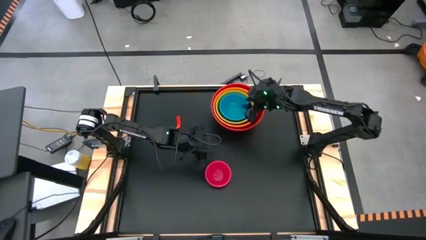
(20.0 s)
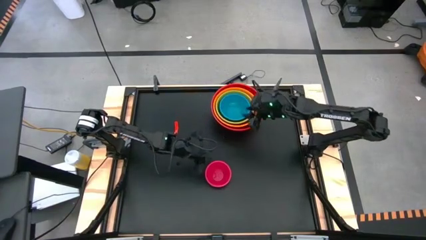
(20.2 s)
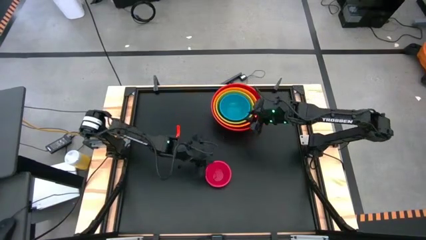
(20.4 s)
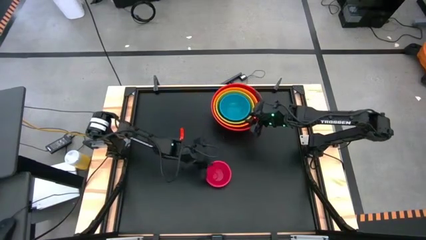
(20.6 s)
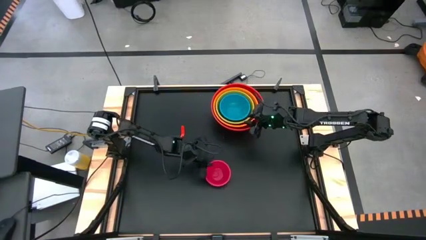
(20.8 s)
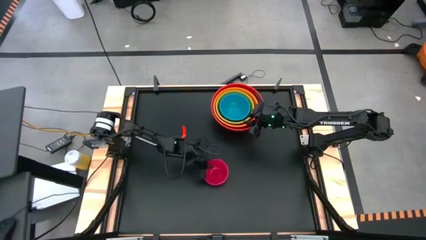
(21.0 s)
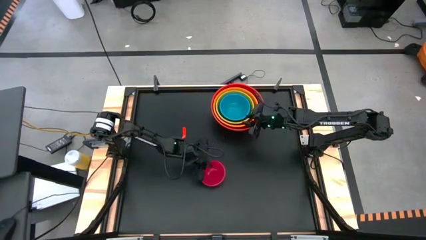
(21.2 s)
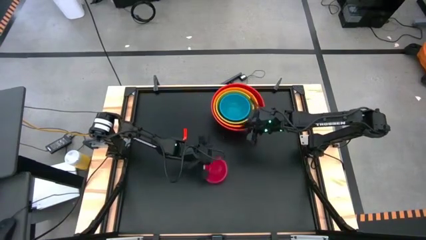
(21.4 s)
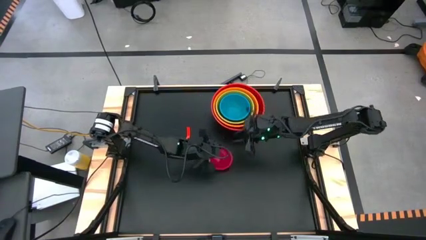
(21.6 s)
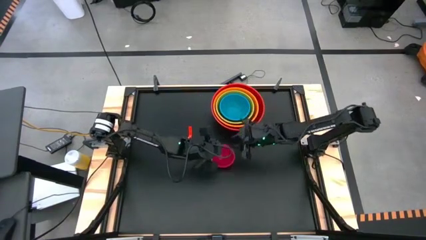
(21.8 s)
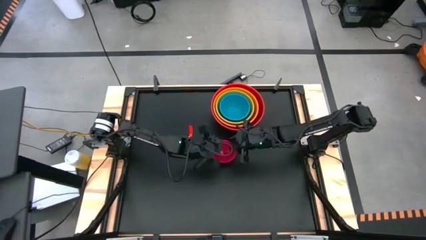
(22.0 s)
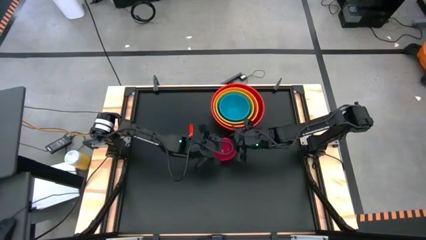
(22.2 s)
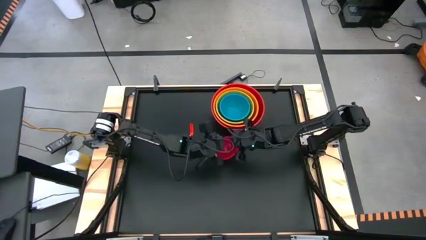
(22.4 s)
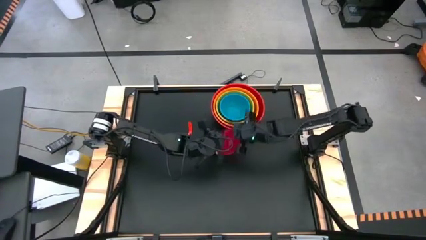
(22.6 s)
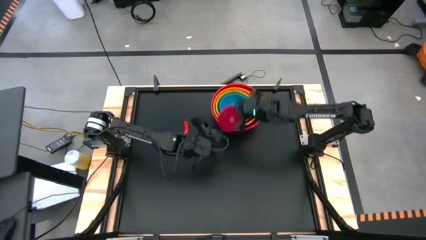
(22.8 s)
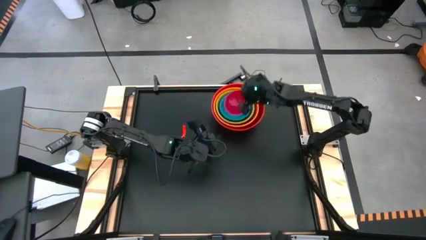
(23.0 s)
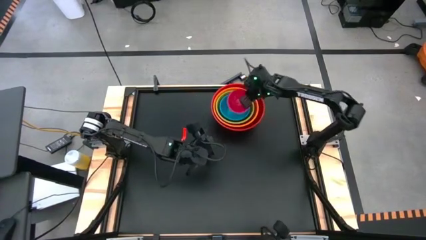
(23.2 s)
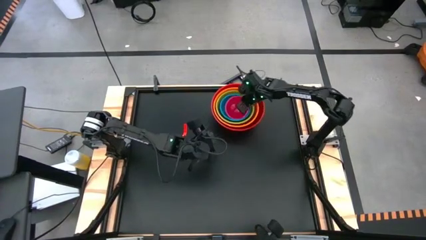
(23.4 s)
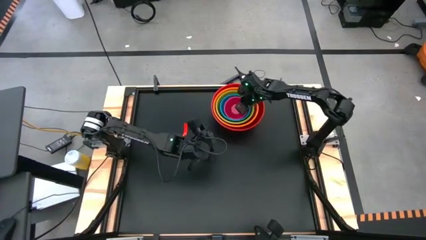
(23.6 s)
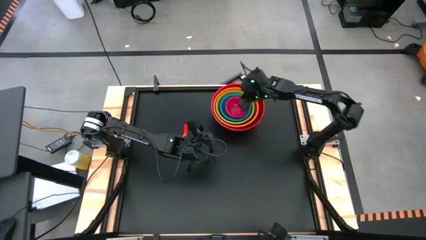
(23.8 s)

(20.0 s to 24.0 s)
Stack the pink bowl on the blue bowl

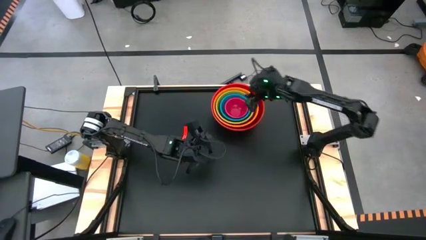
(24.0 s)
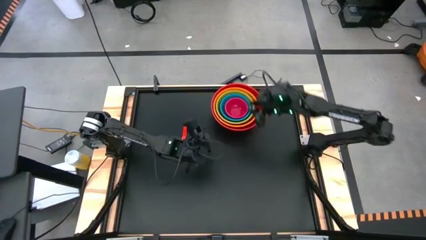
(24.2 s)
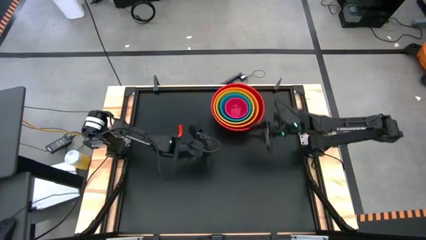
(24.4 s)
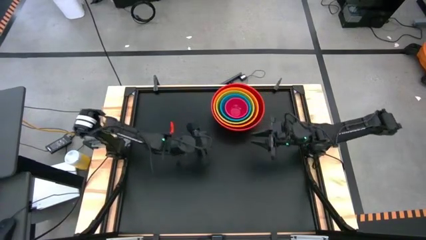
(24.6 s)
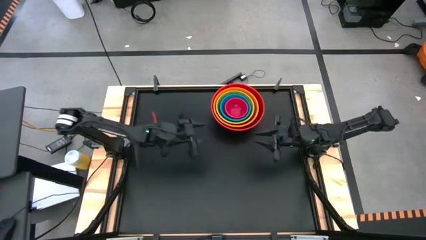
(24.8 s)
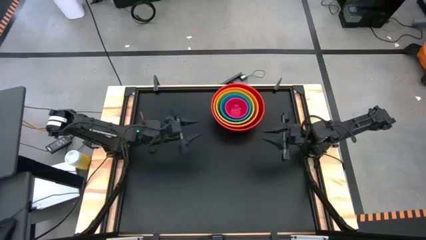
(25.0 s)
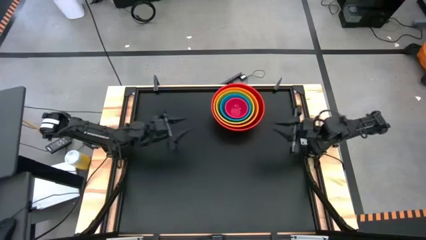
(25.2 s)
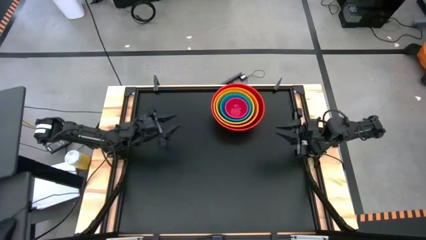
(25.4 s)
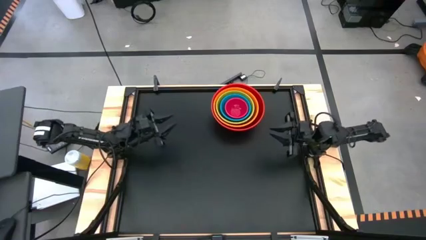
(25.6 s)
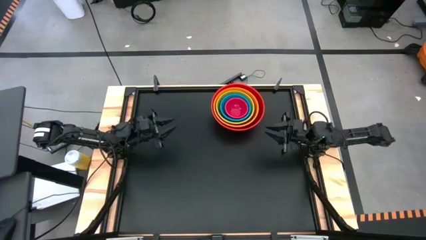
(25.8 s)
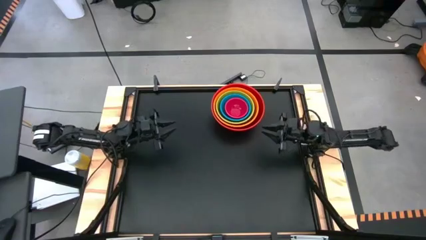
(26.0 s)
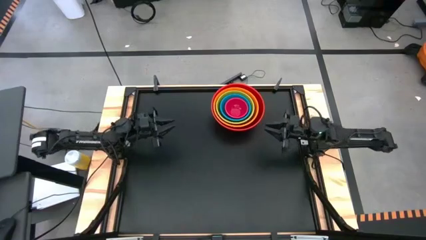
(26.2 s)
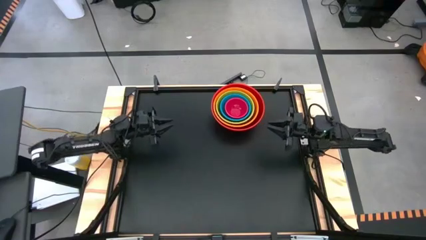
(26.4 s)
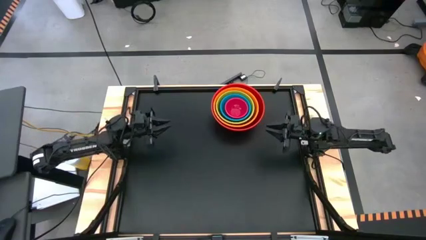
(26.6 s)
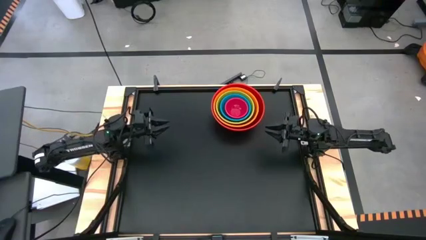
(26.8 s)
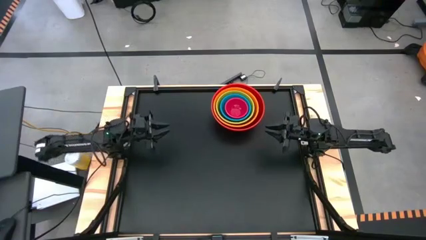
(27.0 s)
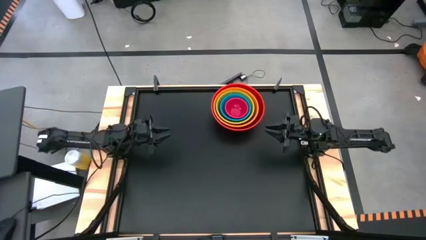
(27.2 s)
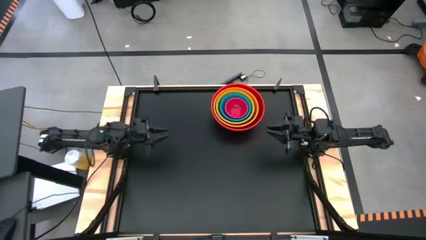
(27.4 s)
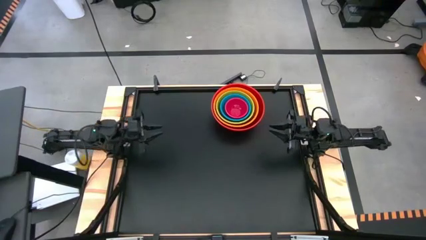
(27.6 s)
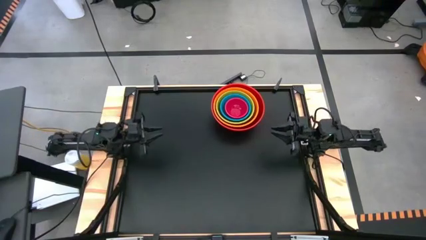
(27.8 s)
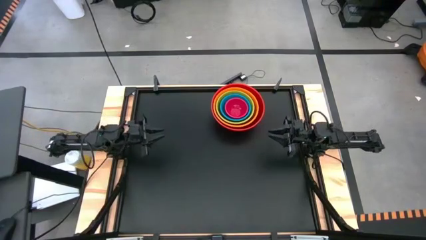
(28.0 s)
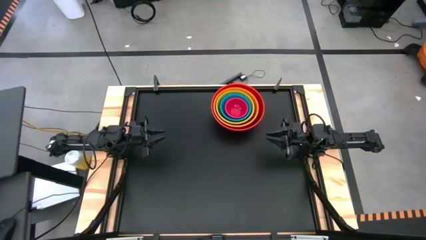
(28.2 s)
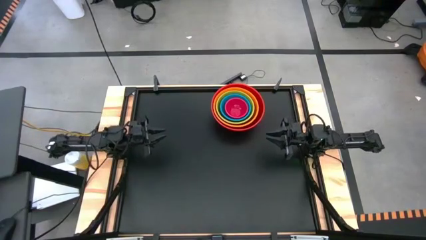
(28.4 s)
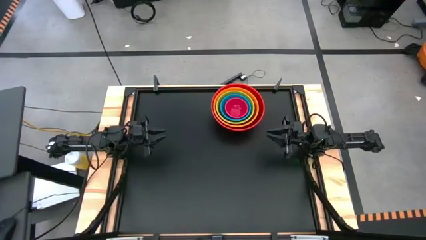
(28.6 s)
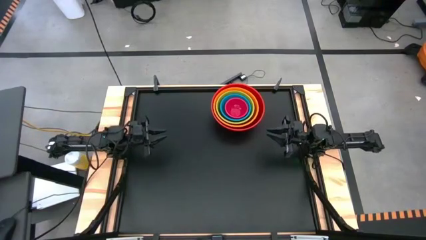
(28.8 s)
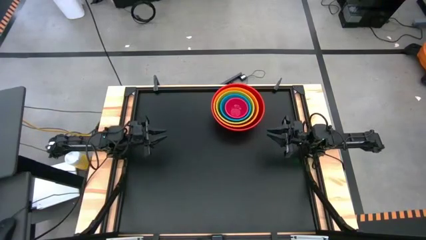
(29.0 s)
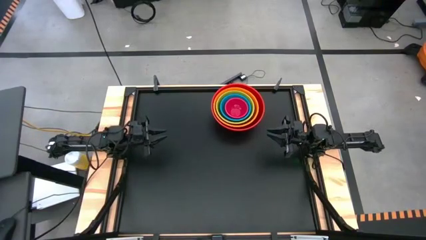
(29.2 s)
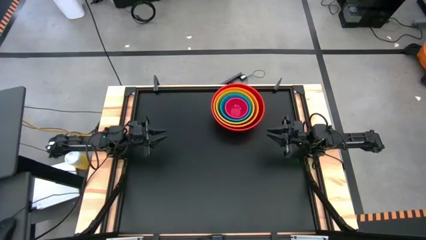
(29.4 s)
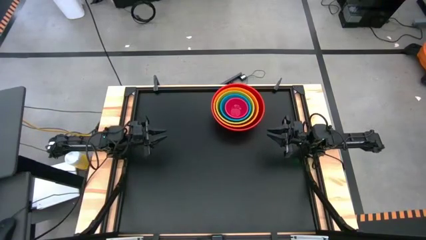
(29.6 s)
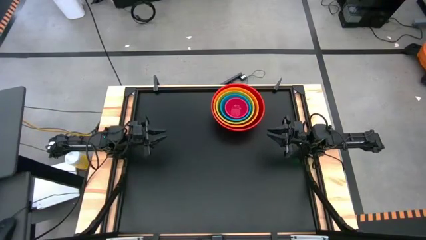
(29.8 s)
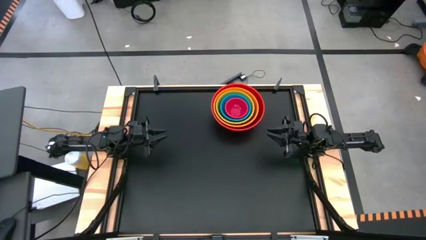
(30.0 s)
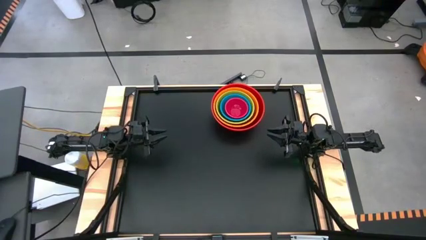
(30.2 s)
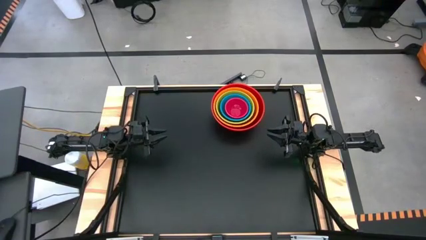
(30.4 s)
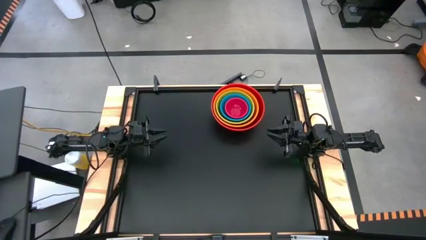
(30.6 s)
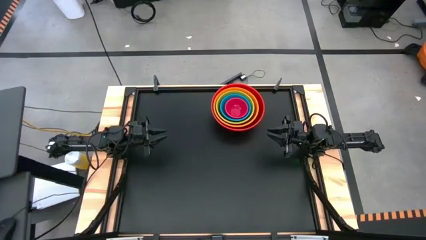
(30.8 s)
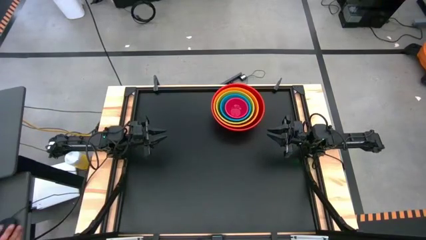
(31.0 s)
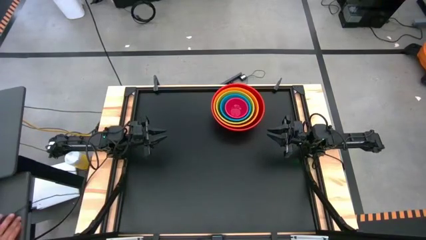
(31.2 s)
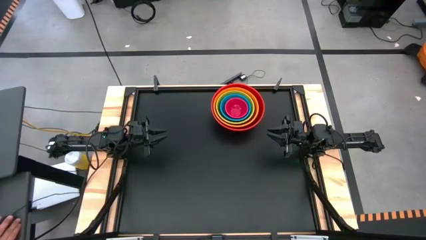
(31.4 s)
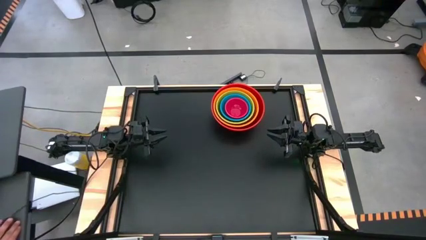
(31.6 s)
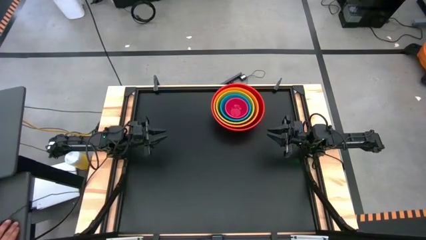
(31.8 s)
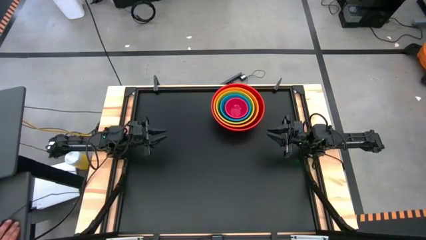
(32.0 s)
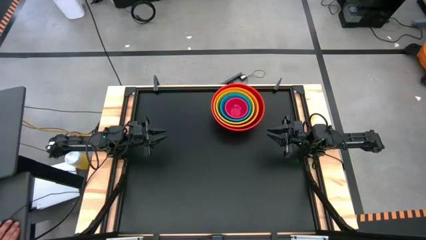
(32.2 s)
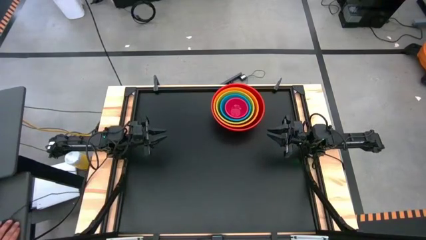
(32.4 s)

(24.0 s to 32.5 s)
Return to Home Position

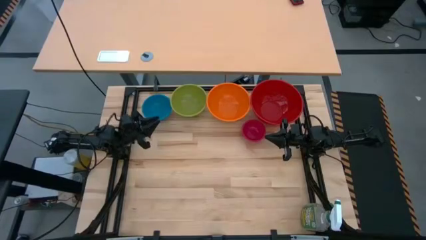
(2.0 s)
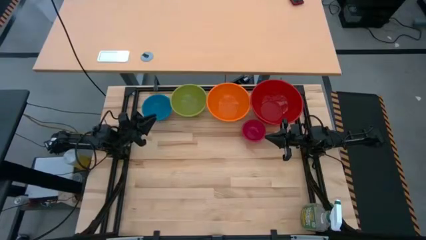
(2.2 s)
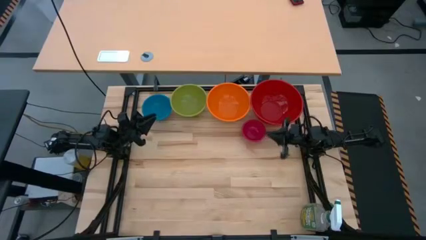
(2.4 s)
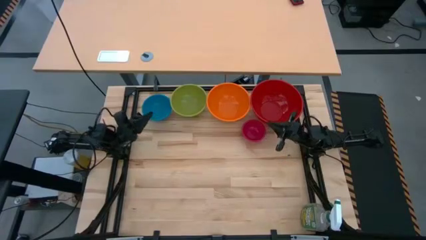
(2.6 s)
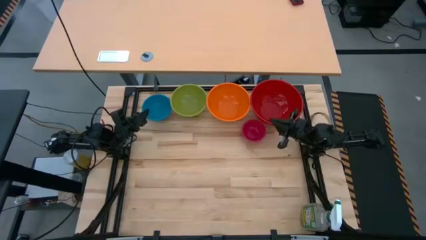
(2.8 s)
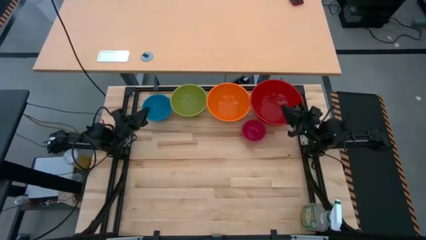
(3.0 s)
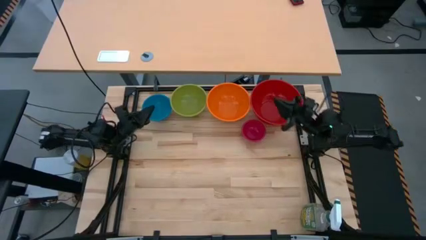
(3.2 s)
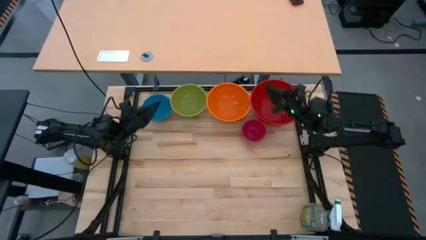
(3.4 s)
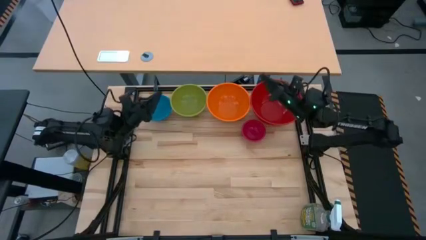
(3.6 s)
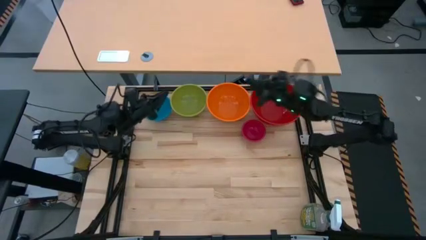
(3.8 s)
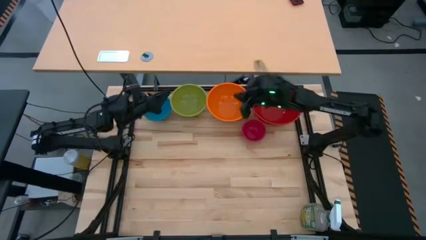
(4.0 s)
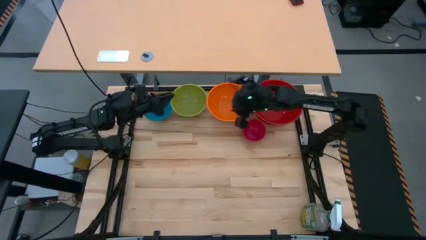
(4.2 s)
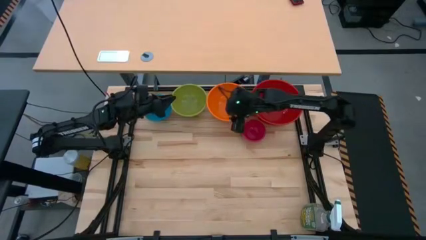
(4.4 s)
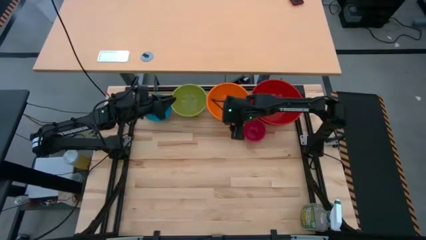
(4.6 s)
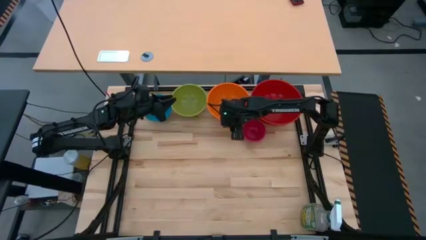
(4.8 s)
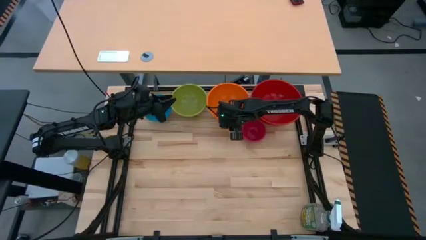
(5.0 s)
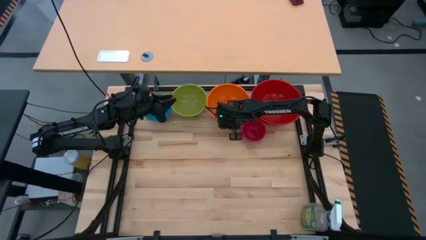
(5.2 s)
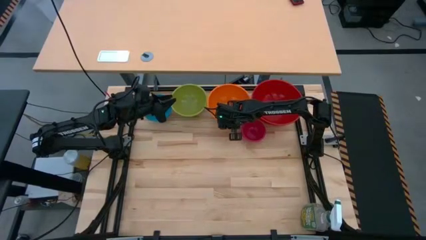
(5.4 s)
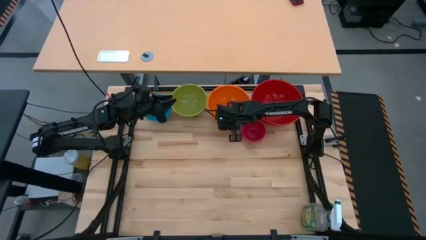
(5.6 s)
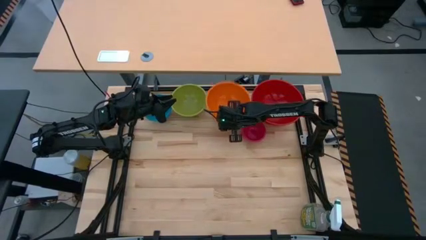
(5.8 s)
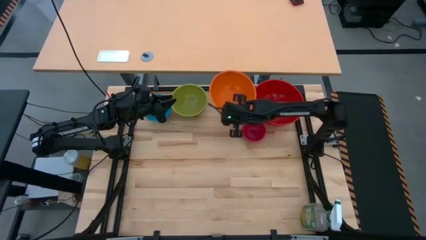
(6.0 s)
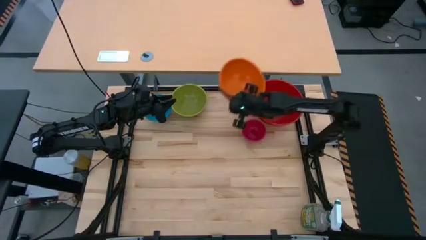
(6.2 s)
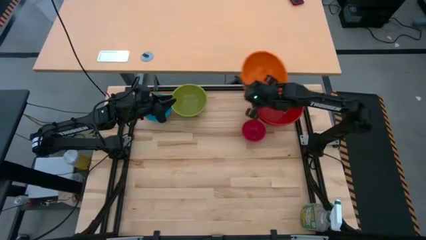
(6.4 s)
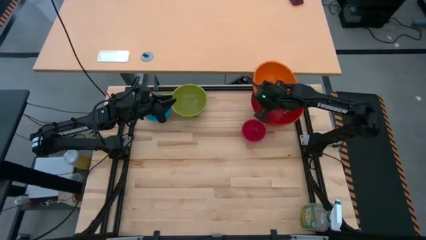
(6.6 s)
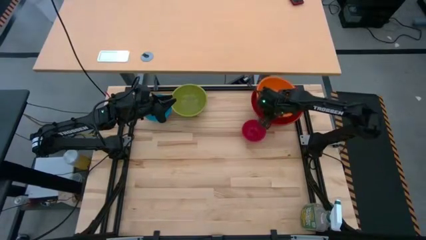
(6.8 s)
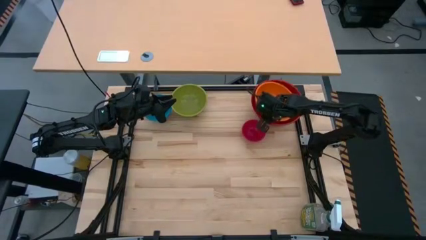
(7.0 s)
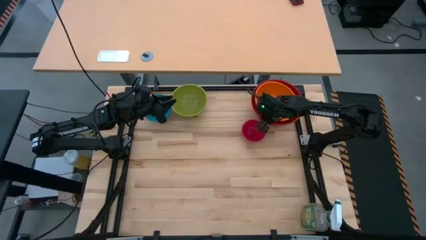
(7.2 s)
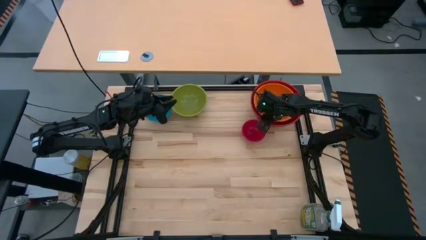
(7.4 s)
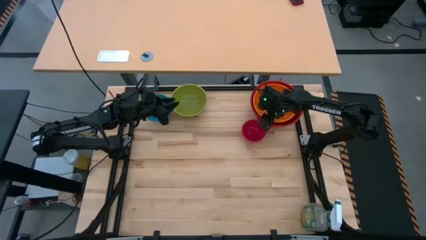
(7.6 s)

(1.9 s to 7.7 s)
Stack the orange bowl into the red bowl
